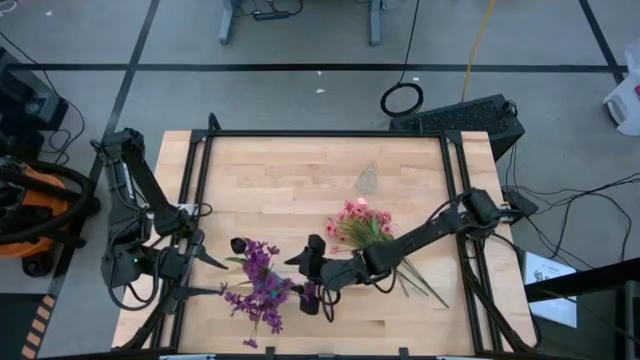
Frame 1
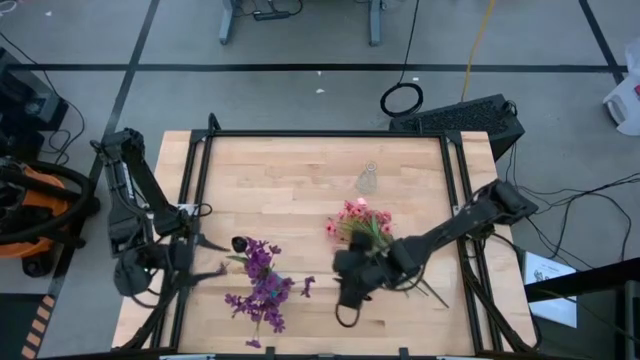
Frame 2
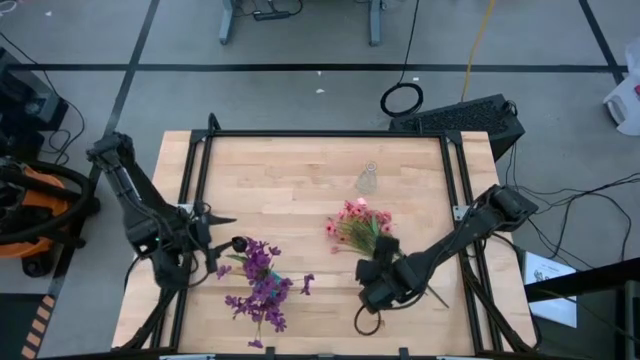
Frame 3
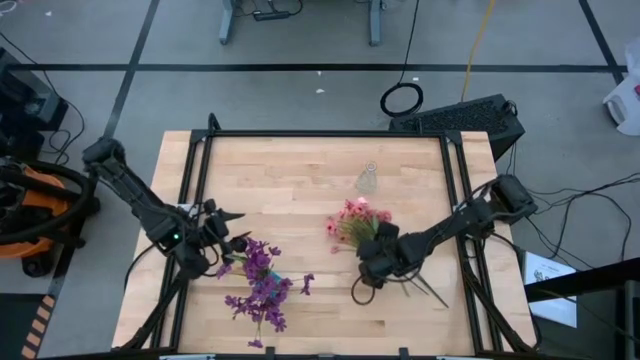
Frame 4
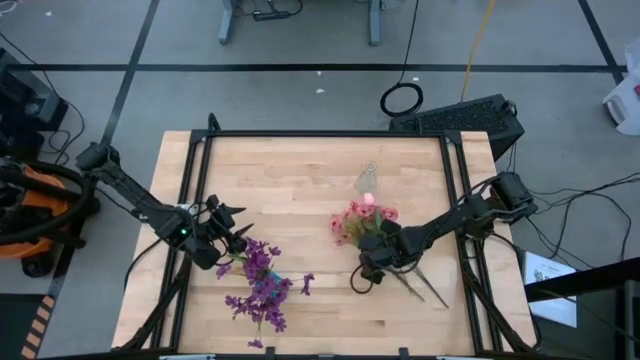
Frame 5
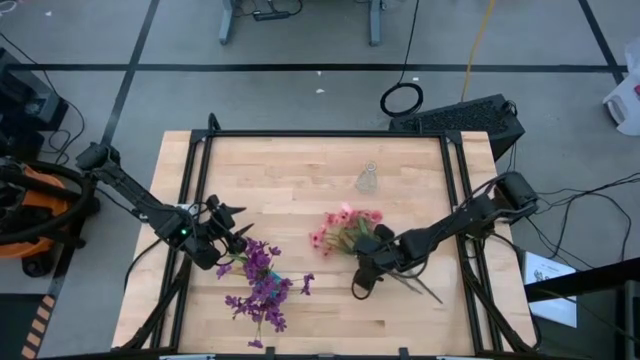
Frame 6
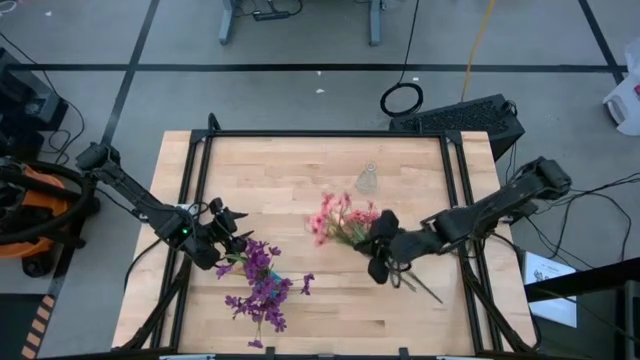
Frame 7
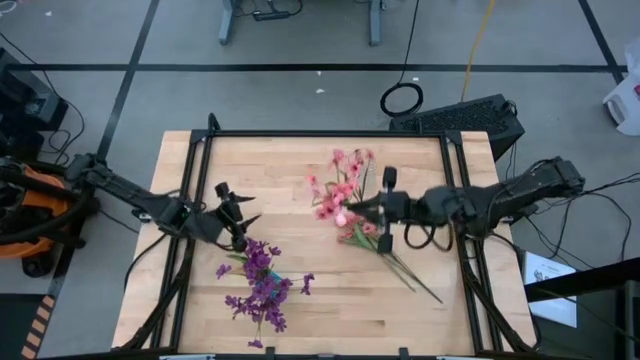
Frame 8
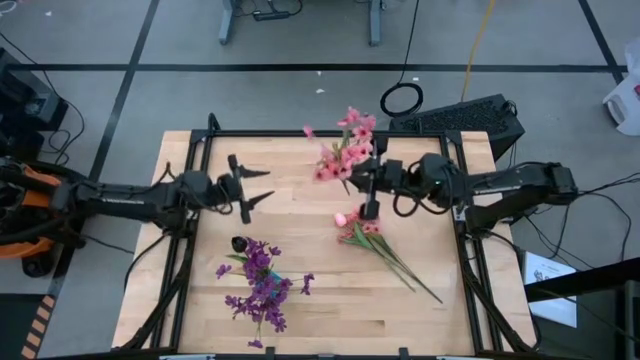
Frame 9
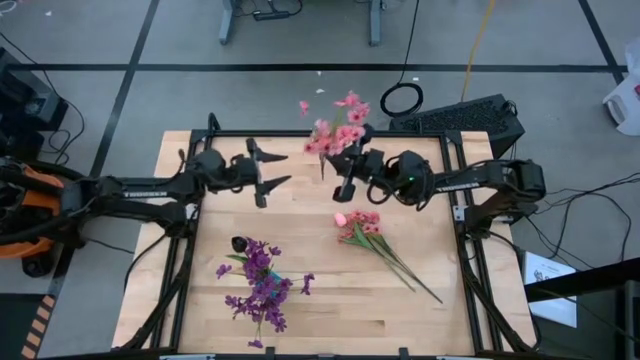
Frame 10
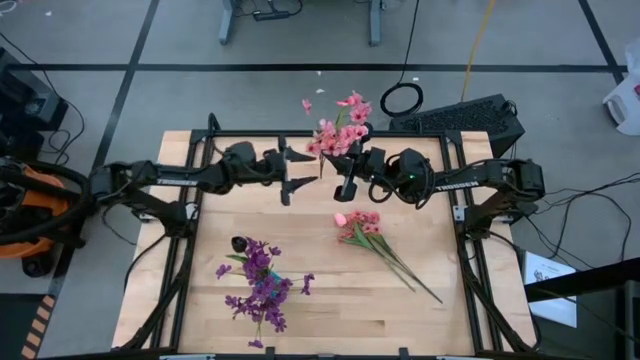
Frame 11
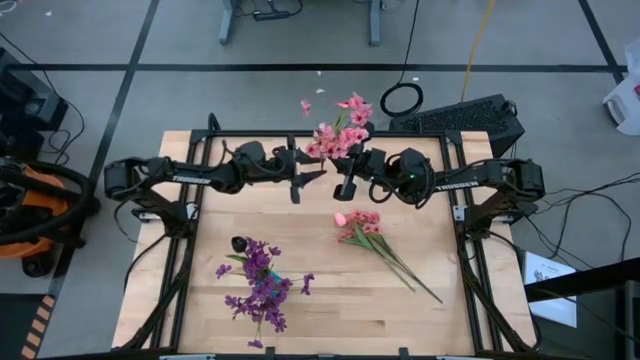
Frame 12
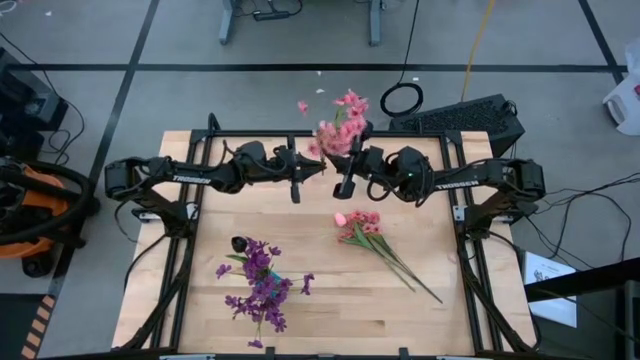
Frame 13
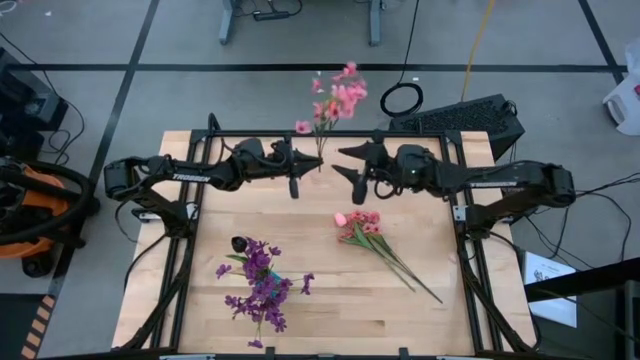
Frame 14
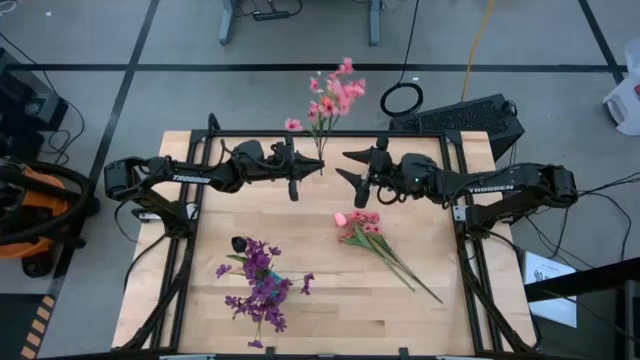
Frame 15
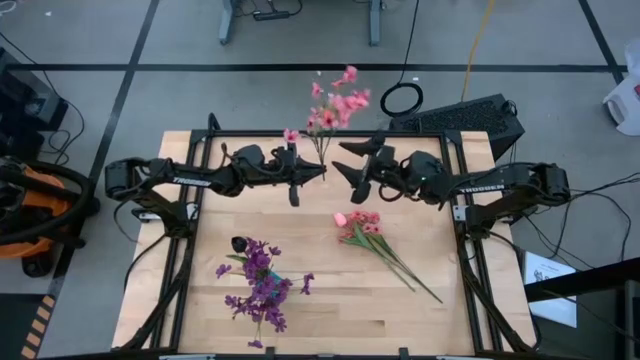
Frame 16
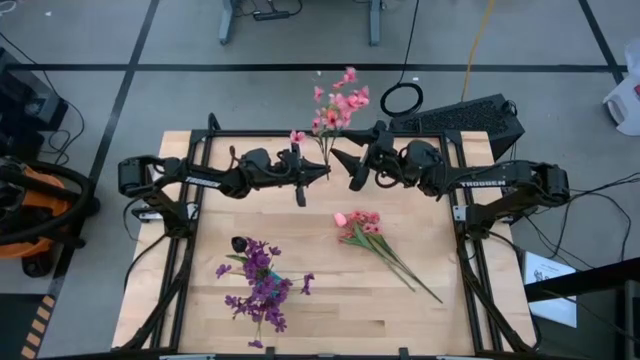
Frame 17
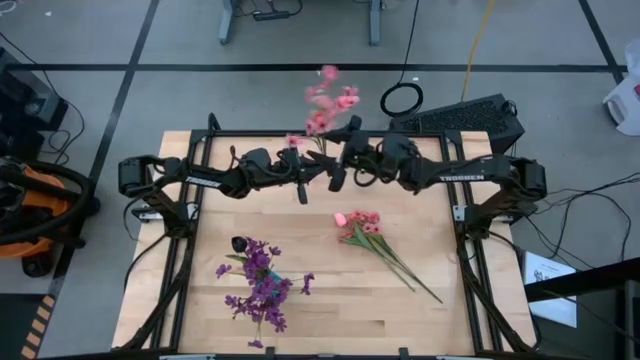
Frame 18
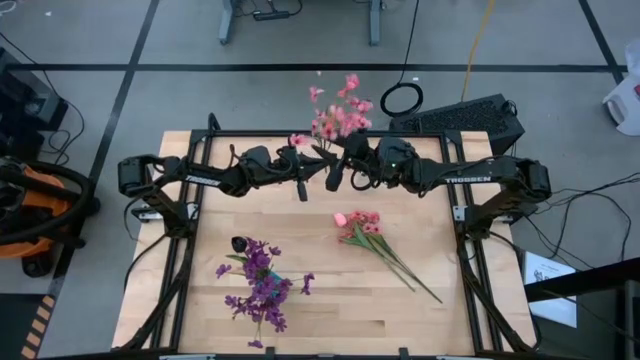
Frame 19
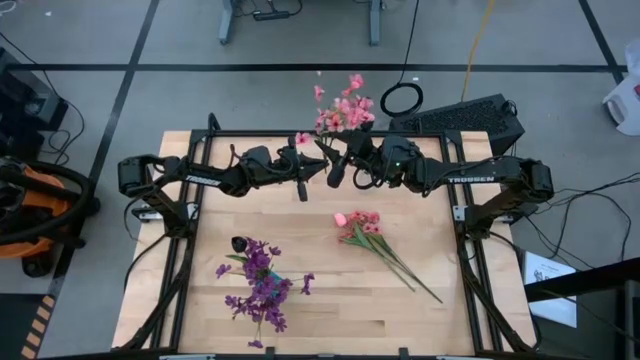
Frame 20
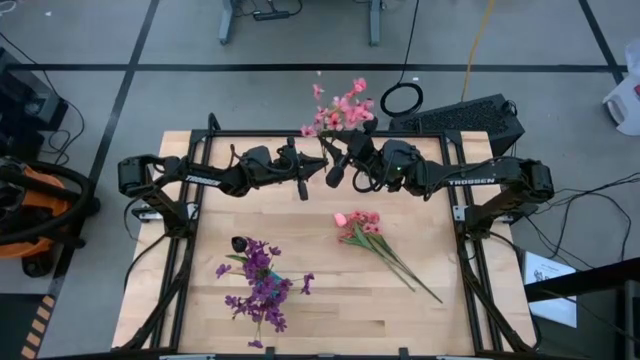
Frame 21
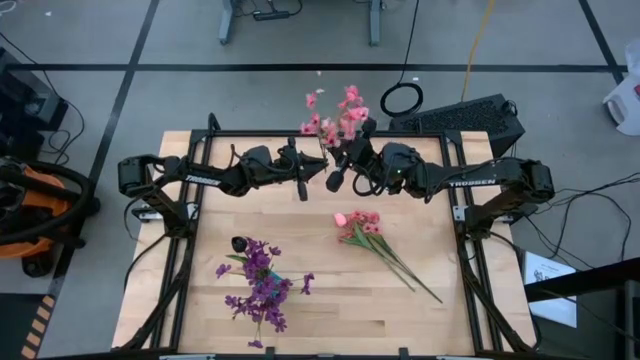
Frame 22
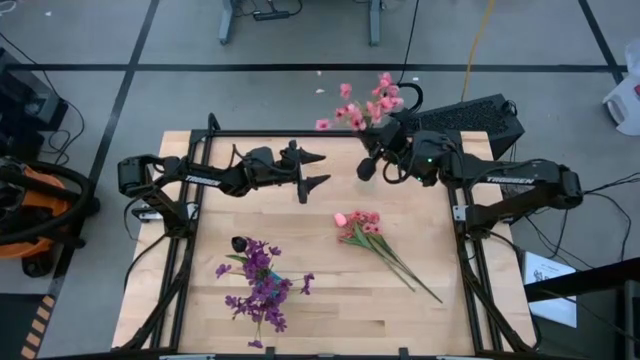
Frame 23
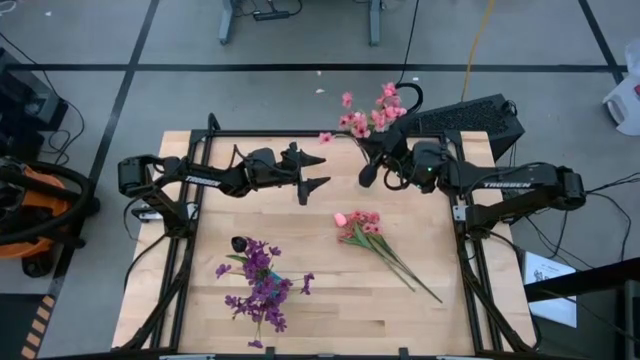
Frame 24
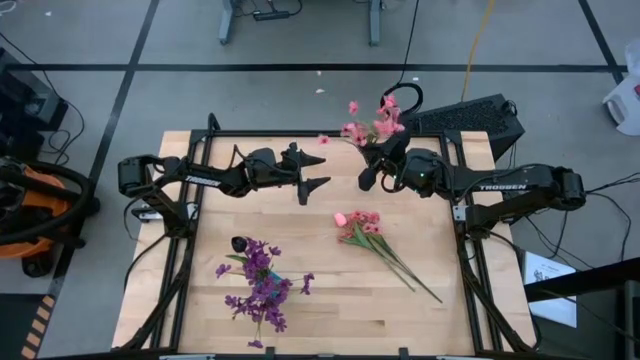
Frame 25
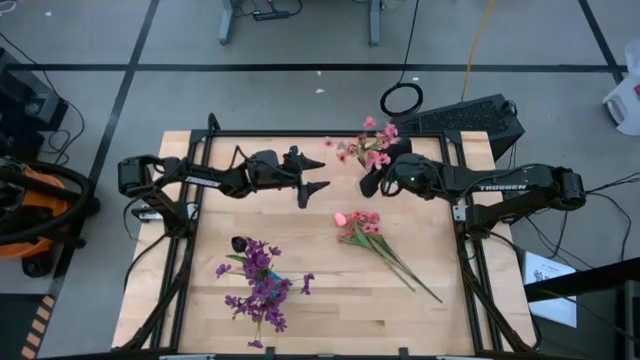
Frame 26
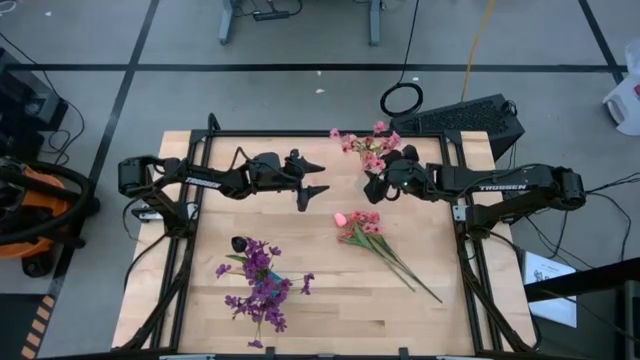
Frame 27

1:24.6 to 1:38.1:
Task: Sort flowers into vase by color
Put the left pink flower into the transparent vase

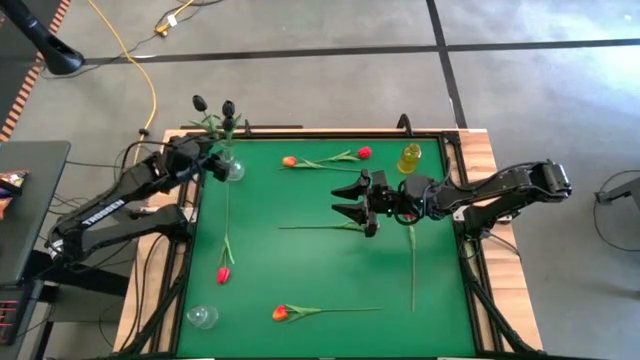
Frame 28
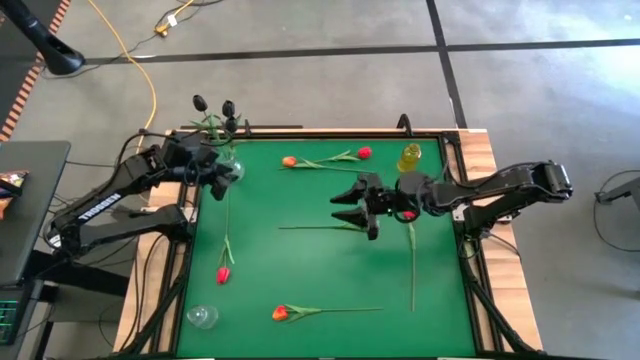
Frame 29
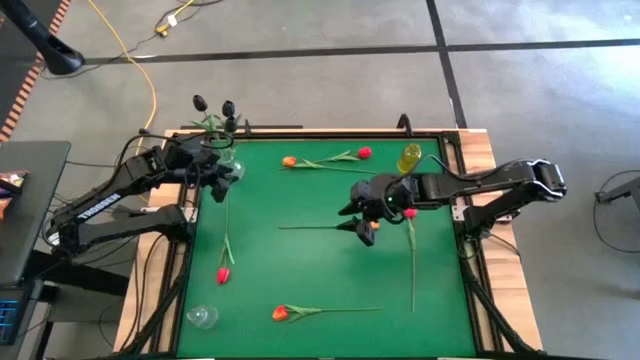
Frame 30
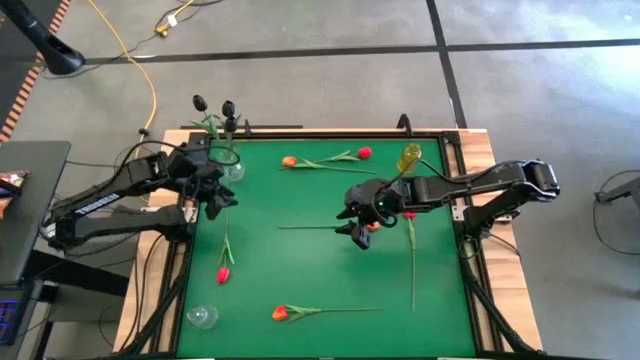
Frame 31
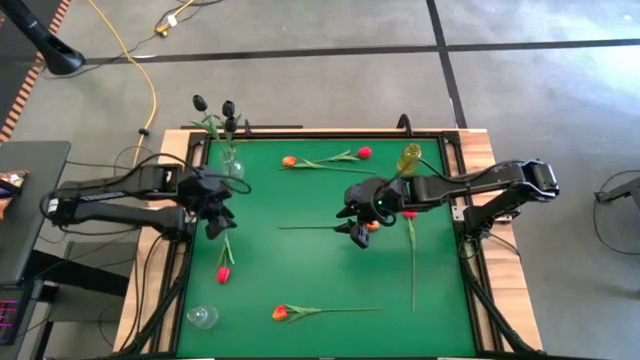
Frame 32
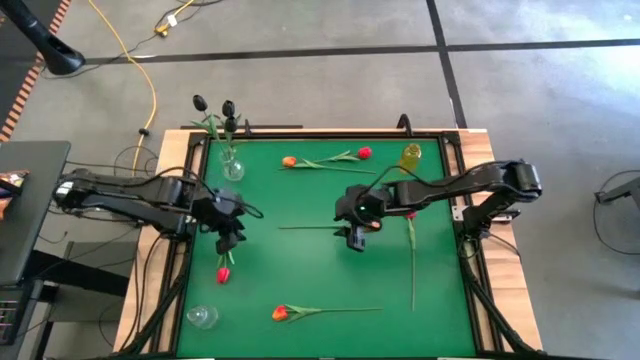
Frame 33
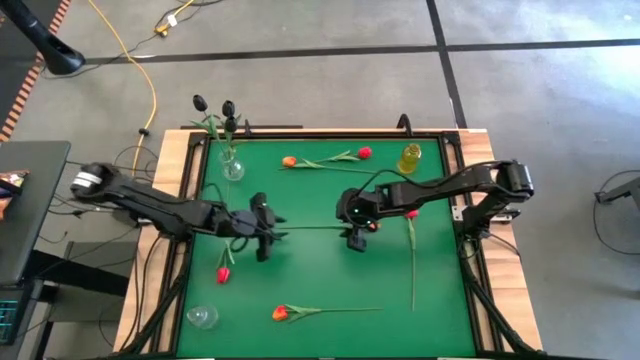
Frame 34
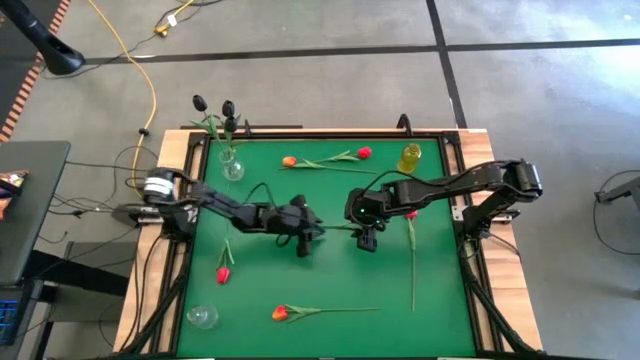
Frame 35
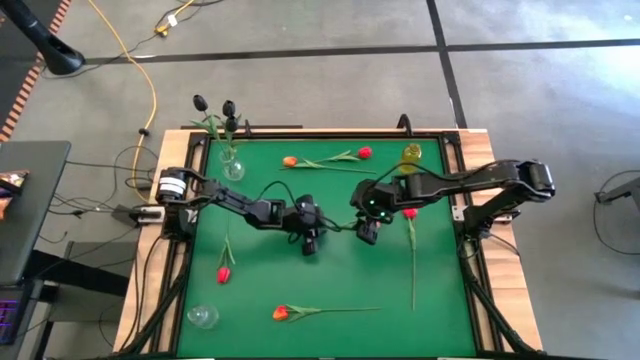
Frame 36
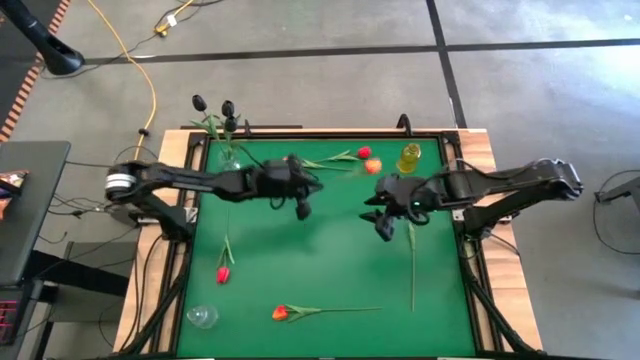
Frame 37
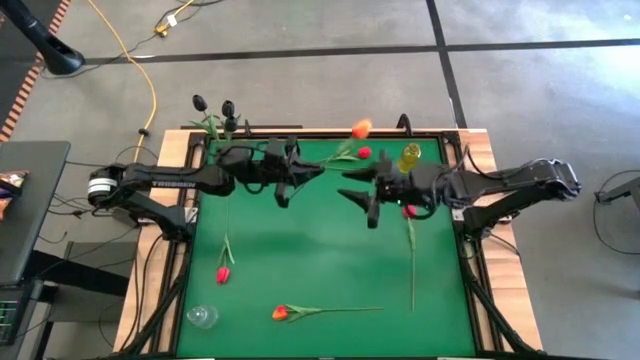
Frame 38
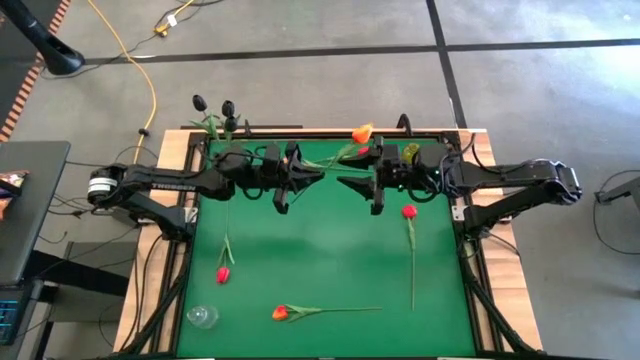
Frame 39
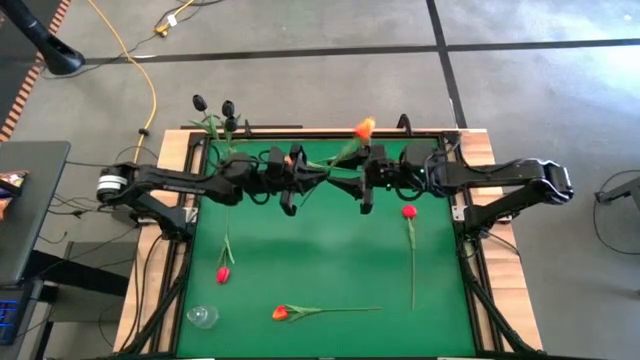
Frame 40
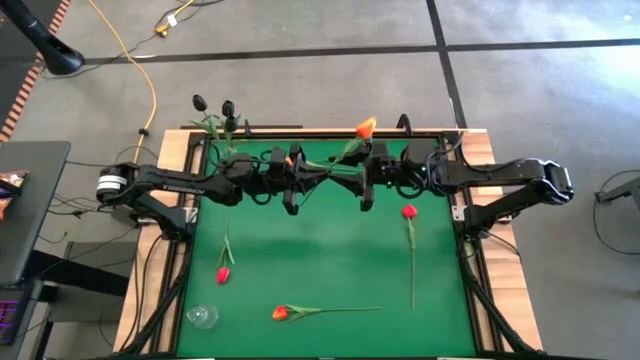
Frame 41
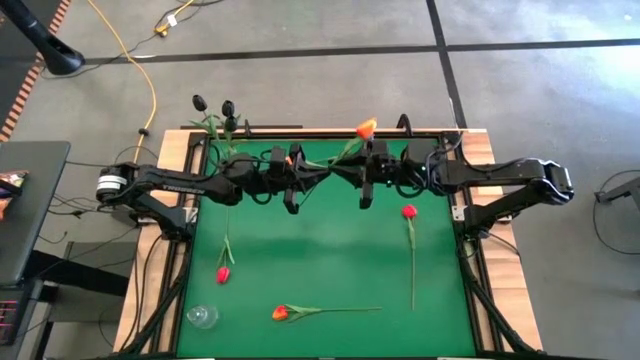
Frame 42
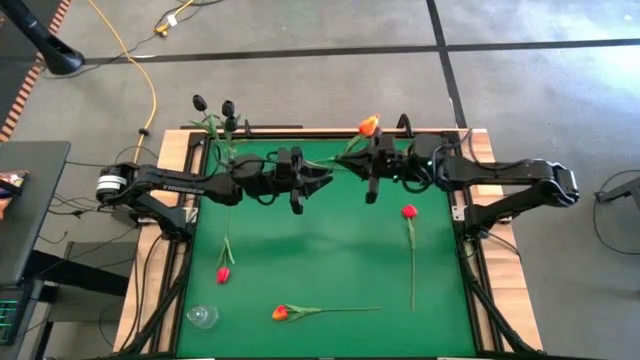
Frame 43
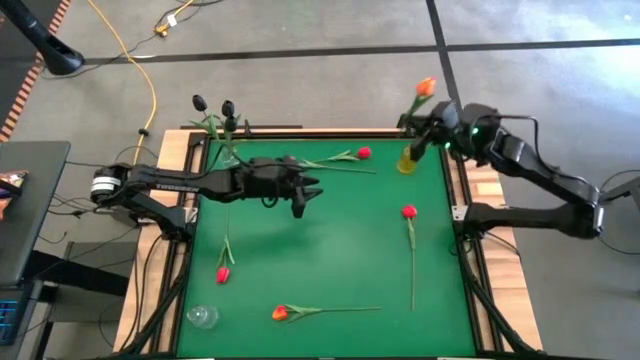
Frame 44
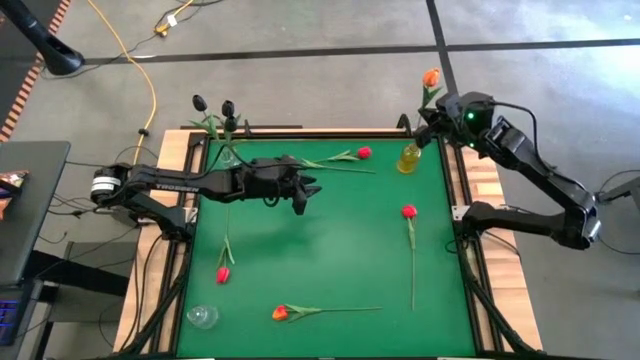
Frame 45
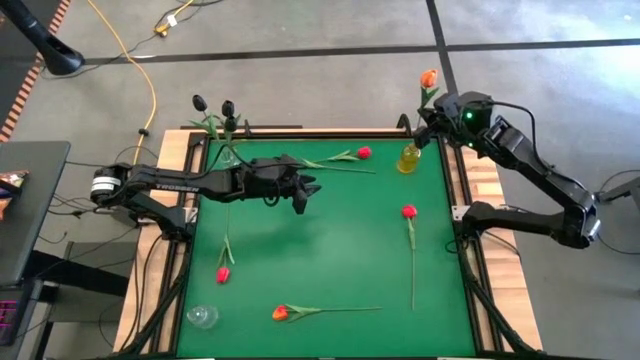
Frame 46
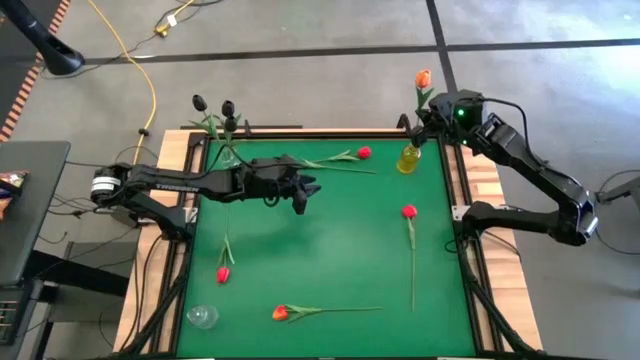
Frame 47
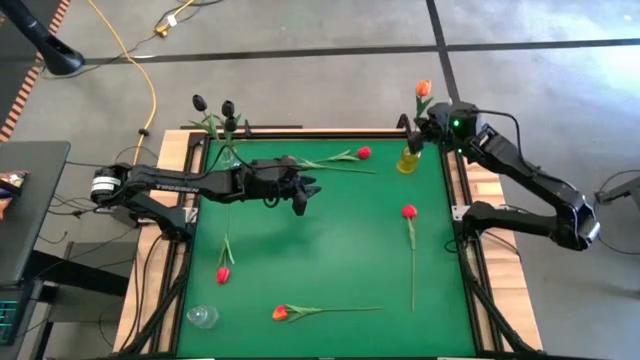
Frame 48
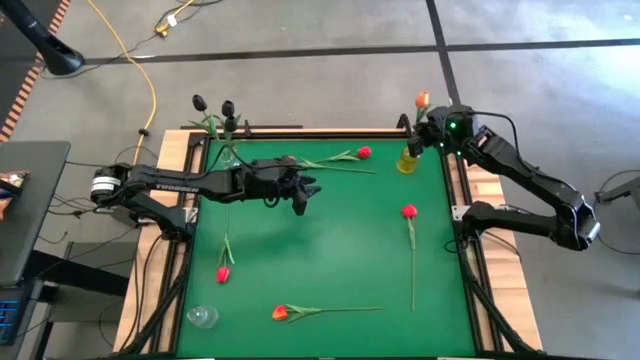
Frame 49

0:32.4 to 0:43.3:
Task: Sort flowers into vase by color
Put the middle orange flower into the yellow vase
